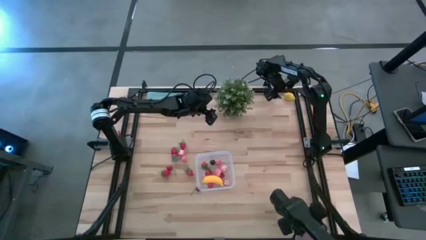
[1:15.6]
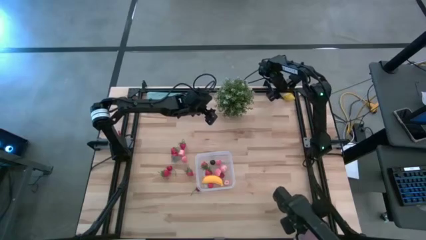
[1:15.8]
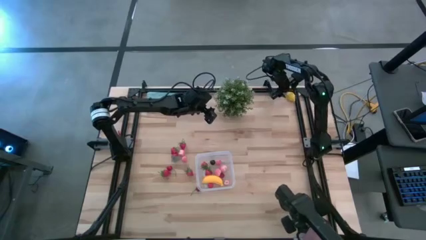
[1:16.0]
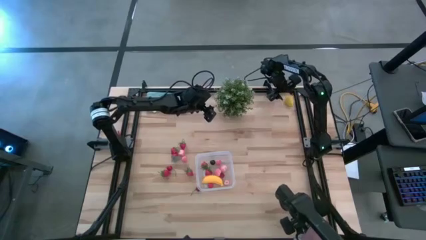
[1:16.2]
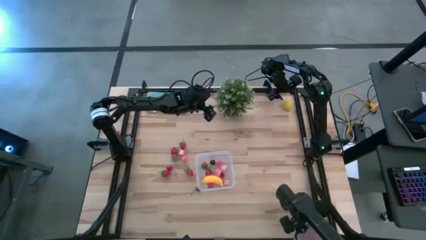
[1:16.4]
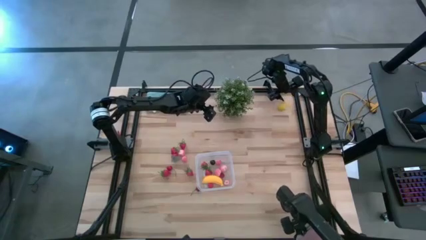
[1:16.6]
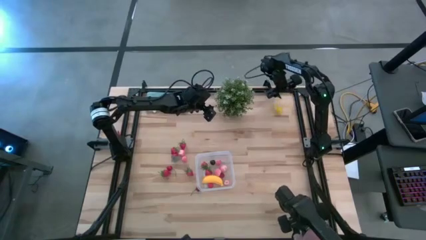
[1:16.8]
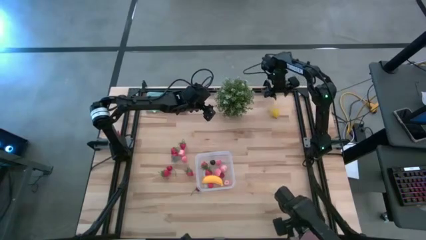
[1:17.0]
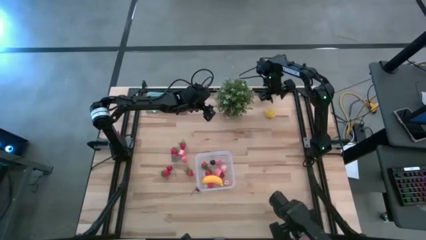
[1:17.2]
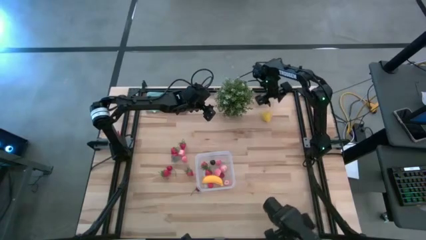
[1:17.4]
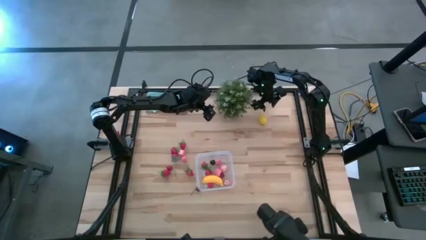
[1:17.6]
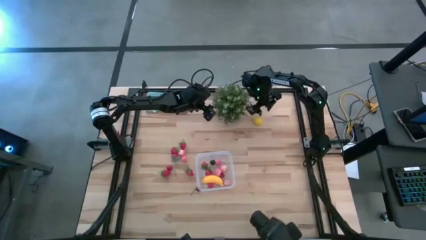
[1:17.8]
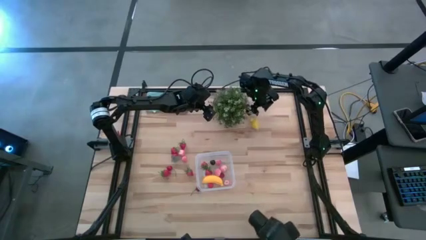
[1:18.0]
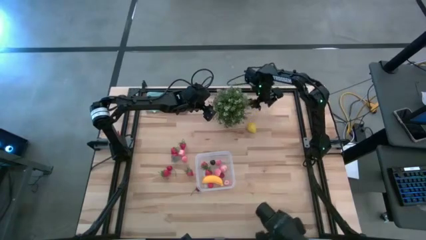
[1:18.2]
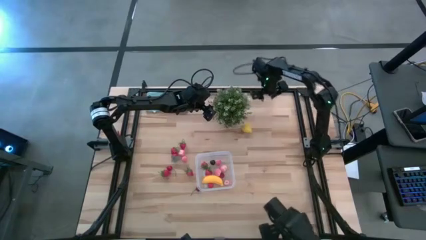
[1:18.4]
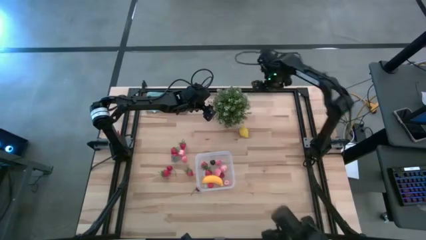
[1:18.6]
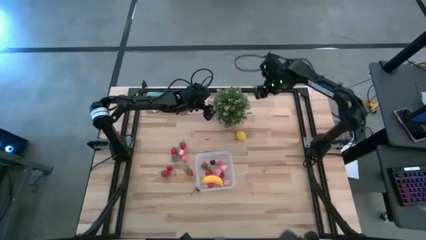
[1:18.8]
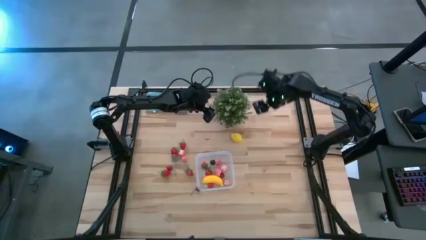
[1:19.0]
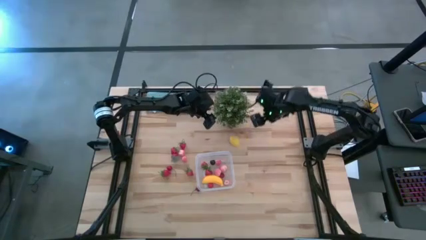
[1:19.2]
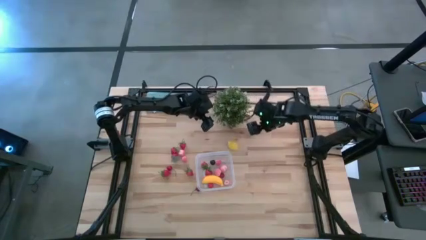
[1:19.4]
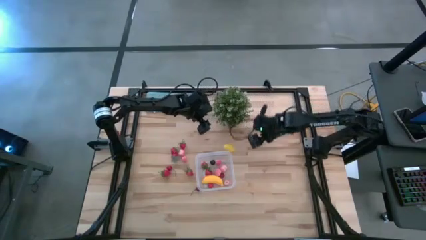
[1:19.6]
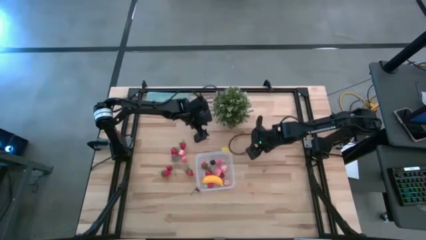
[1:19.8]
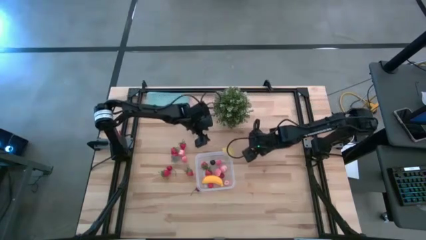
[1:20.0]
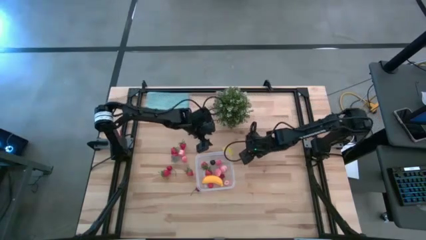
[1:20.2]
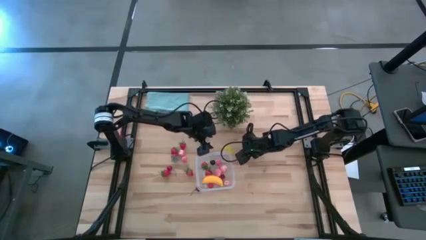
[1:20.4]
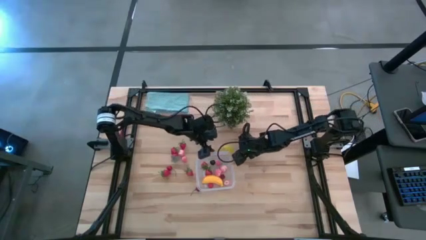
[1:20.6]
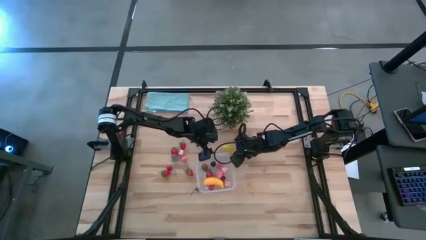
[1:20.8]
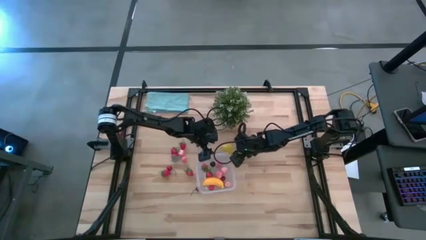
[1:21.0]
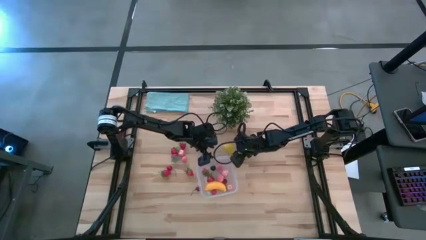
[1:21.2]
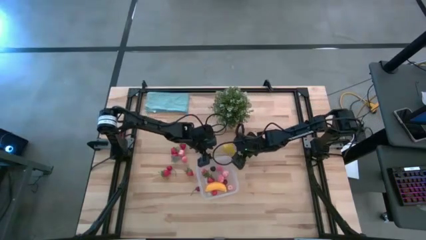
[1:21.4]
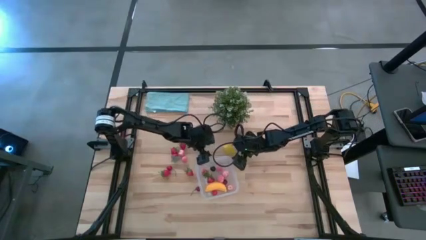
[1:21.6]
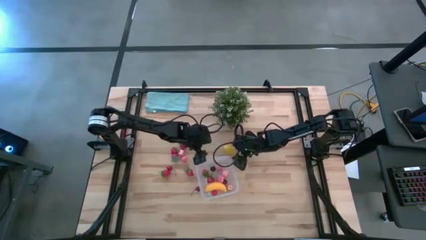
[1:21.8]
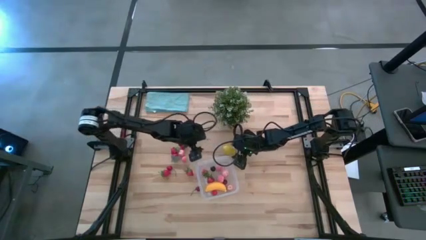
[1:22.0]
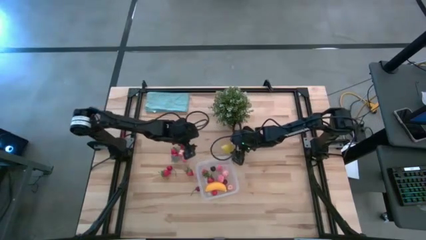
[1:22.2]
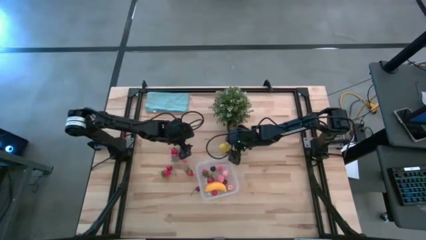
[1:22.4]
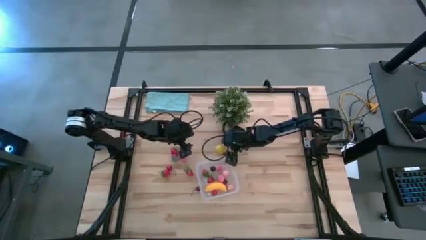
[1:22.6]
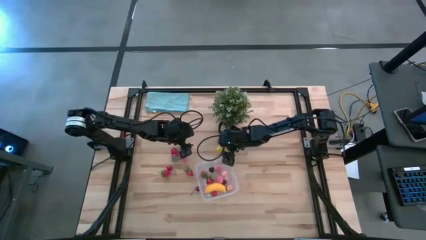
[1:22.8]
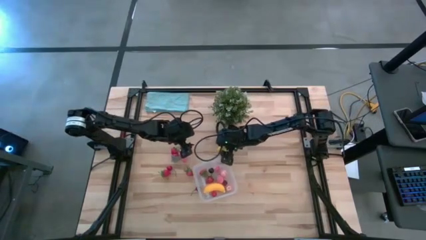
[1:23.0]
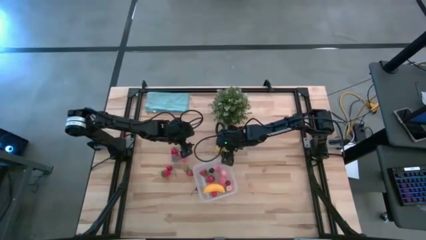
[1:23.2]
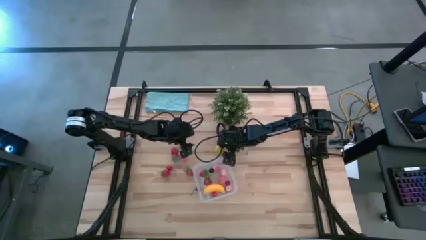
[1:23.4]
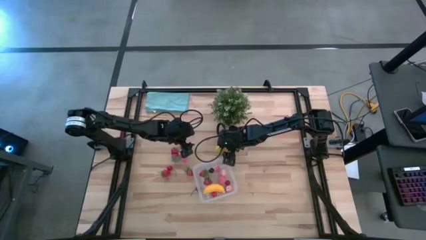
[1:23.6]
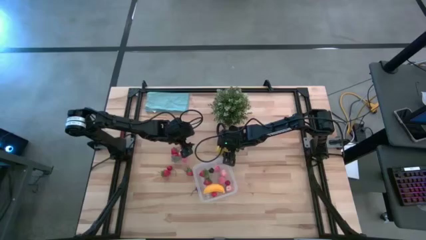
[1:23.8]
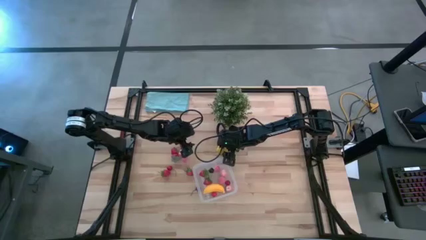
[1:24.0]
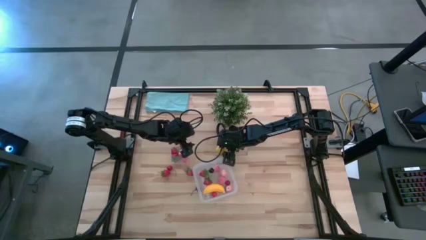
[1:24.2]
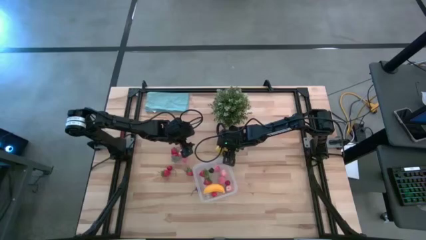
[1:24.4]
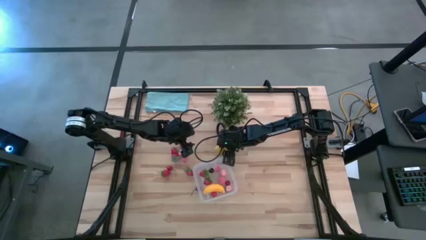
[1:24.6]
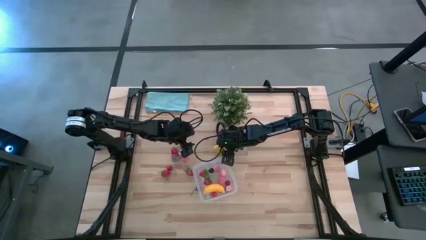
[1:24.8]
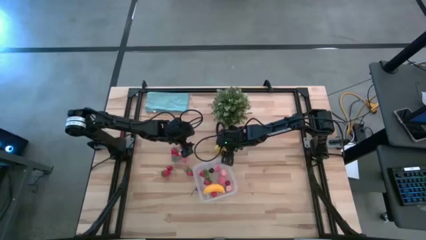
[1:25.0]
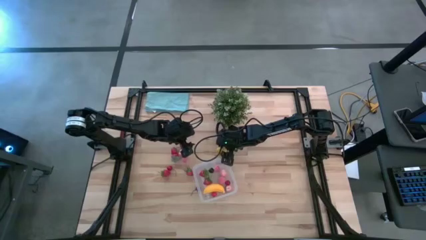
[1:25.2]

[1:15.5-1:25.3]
Task: Pick and placing Produce into tupperware
Put the yellow lemon into the transparent bin

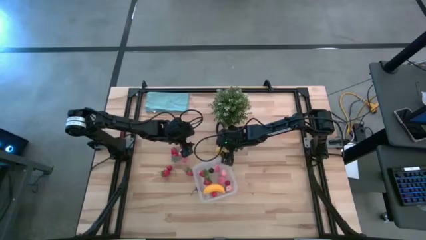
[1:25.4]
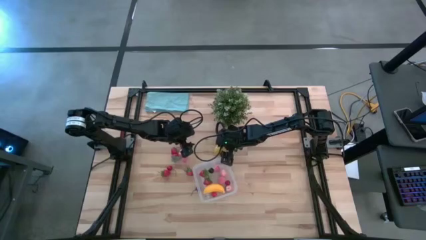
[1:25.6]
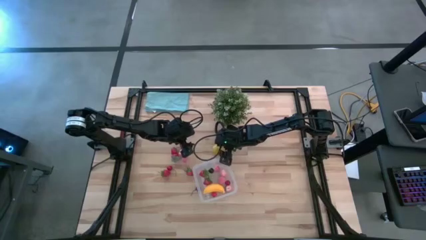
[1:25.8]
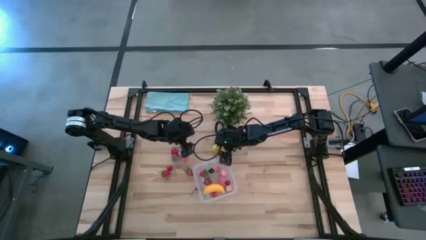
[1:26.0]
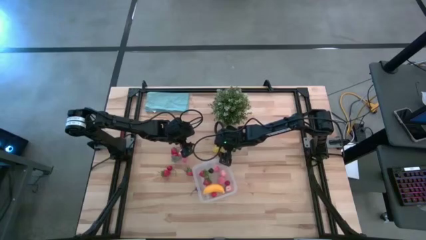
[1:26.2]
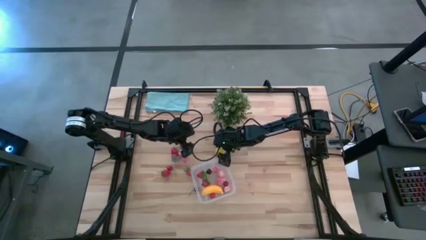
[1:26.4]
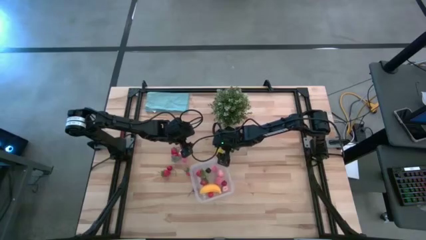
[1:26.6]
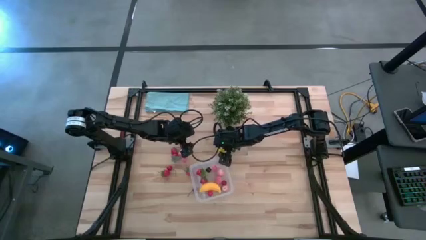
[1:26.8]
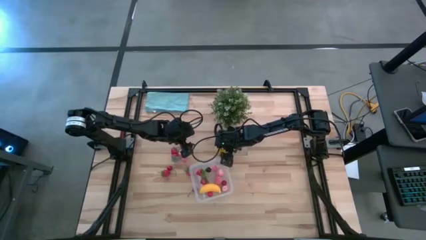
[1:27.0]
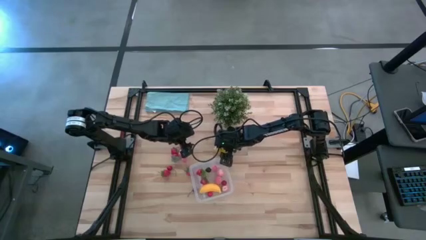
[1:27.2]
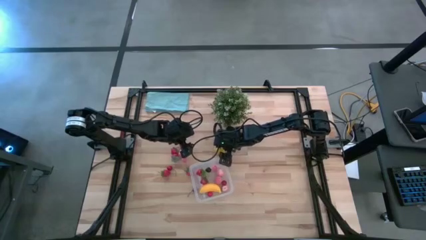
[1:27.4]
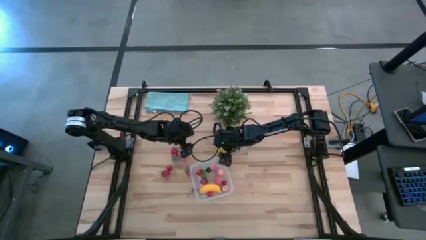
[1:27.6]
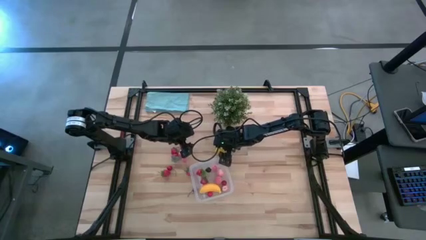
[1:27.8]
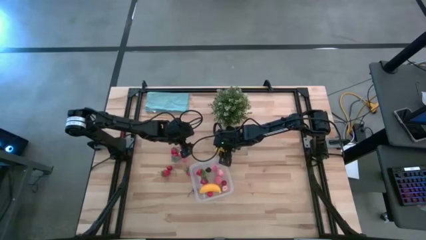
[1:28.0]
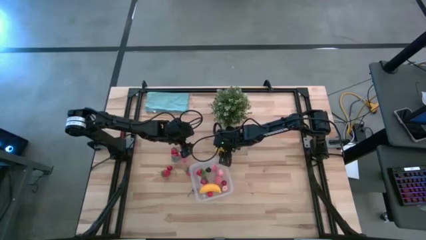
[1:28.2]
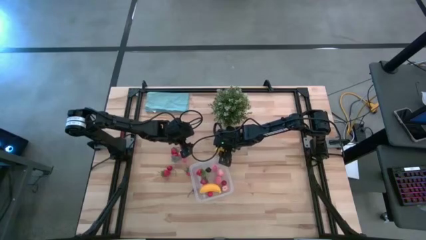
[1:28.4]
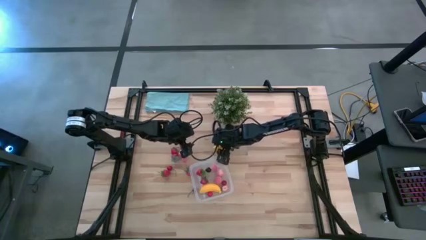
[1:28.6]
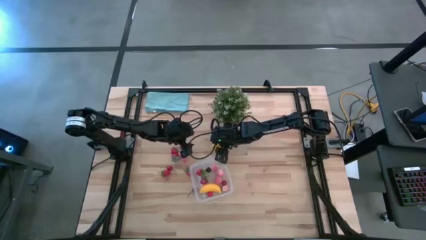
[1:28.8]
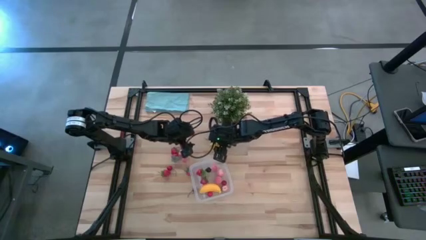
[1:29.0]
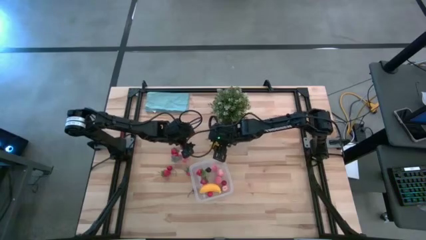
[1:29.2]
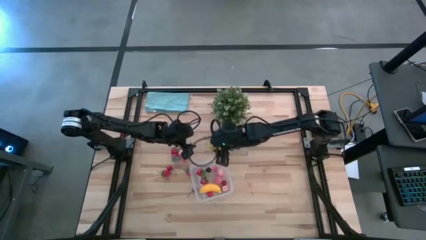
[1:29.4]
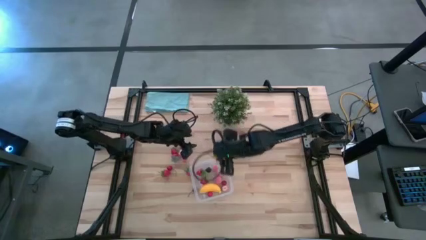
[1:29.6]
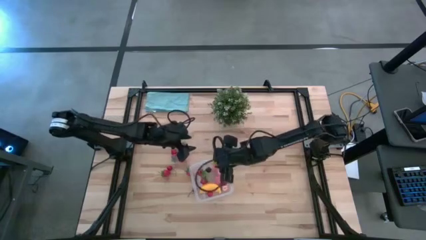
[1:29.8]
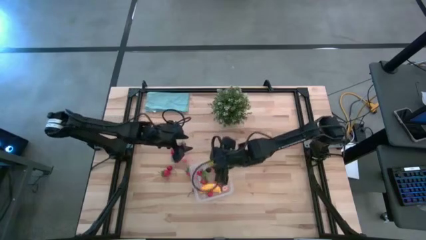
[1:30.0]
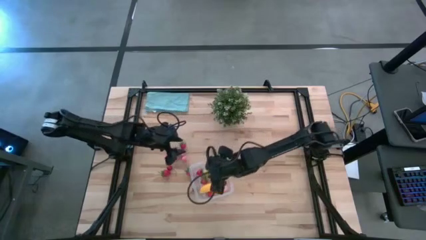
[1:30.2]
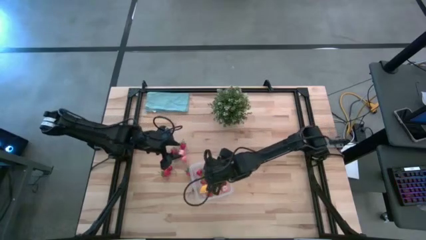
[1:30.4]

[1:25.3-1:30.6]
Put the yellow lemon into the transparent bin

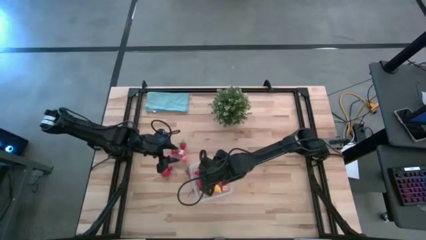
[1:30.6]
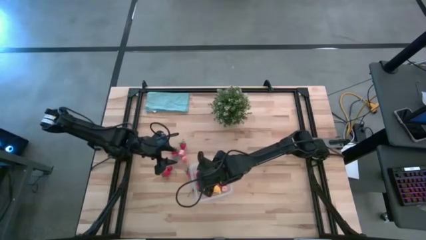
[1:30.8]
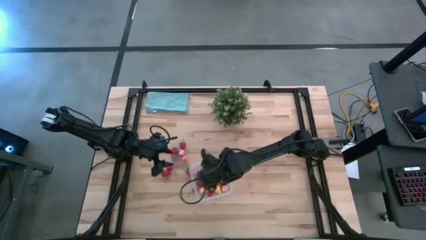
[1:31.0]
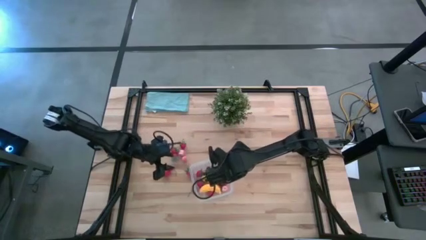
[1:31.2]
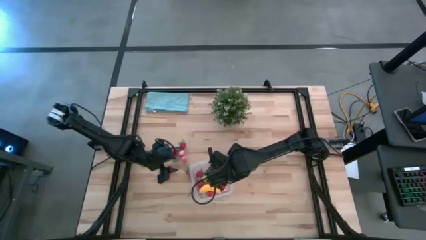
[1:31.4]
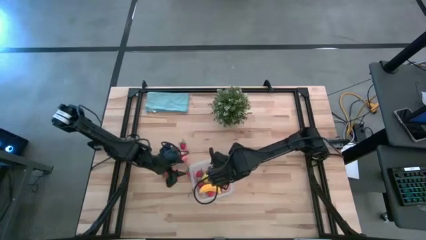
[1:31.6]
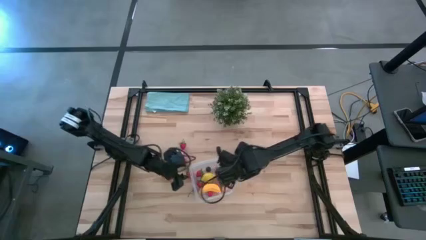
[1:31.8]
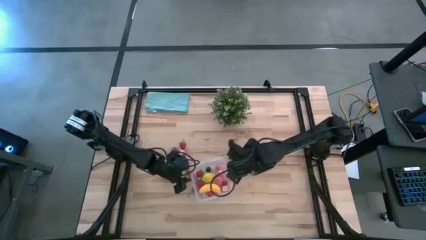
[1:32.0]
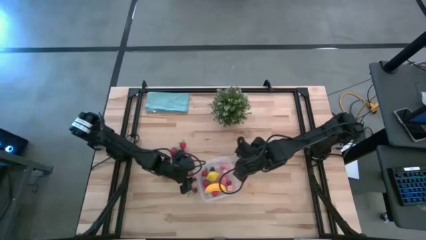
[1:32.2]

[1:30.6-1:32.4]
Adjust the transparent bin on the table

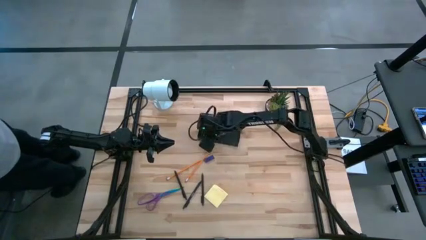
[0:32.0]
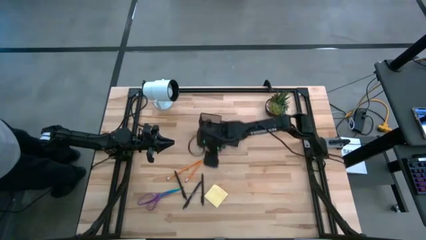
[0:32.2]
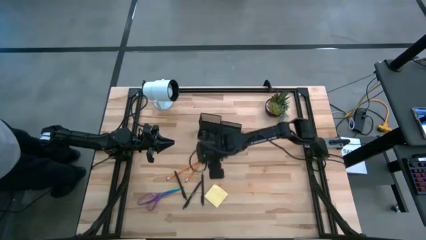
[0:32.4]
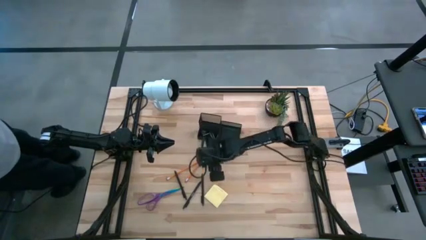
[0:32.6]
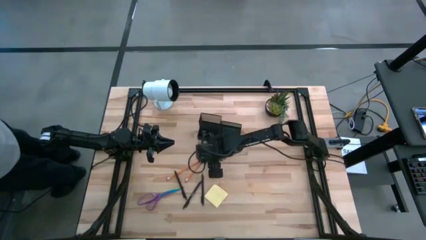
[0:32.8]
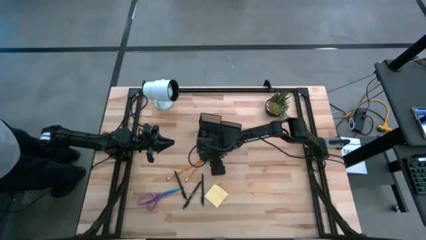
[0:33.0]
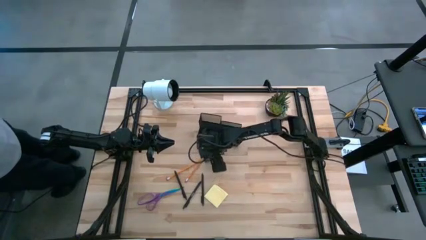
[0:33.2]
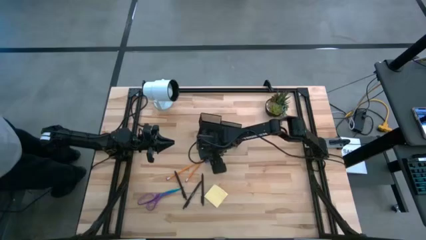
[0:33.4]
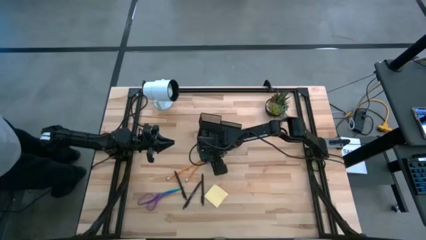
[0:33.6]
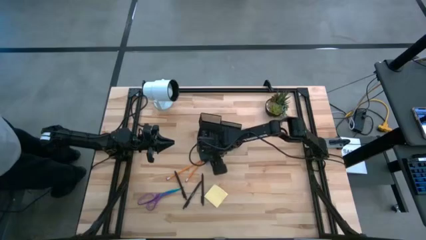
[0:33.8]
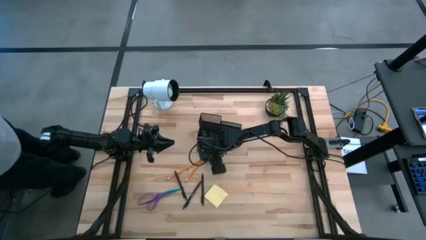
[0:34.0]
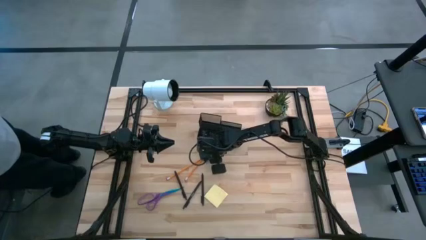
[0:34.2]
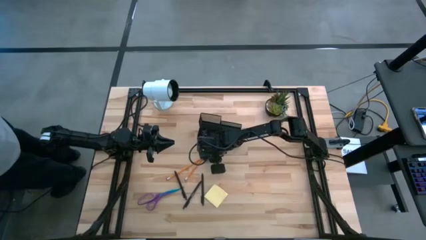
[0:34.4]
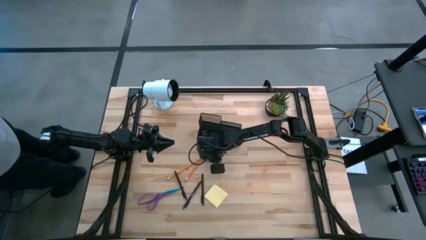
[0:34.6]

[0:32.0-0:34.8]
Task: Pick and place office supplies into organizer
Put the blue eraser into the black desk organizer
